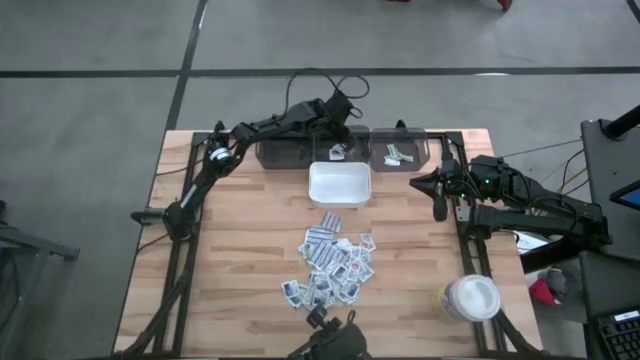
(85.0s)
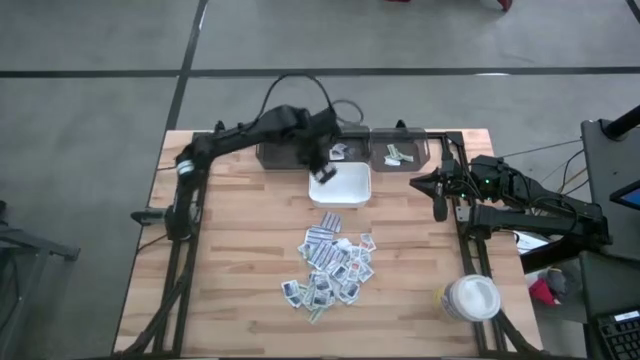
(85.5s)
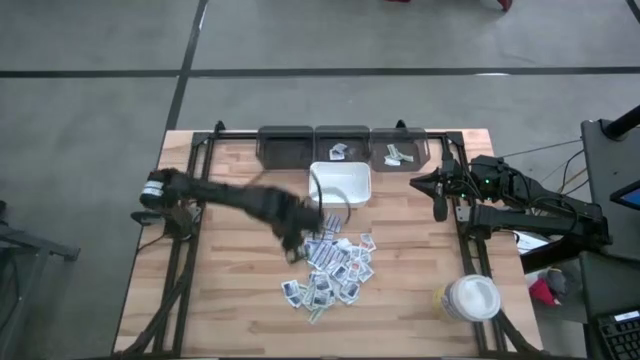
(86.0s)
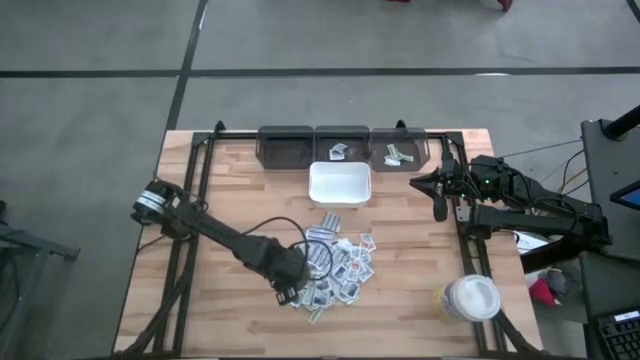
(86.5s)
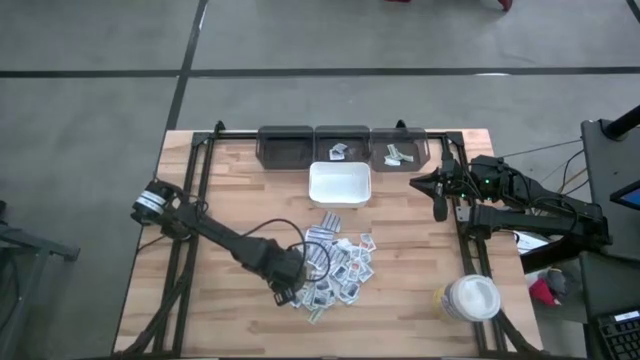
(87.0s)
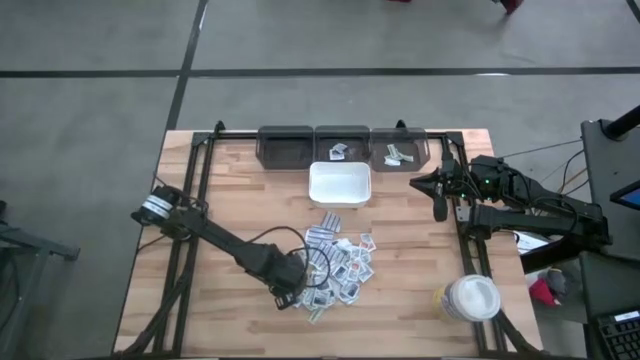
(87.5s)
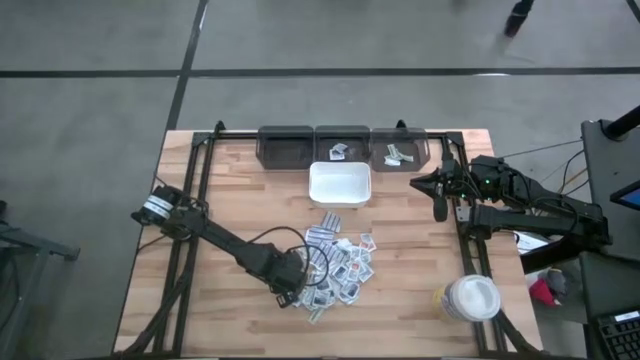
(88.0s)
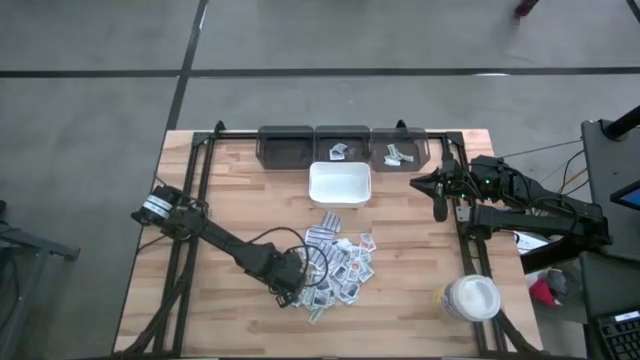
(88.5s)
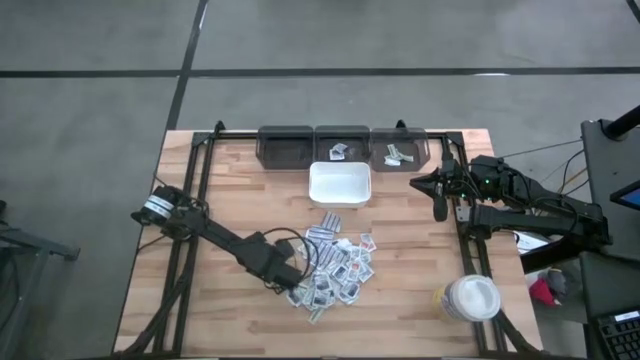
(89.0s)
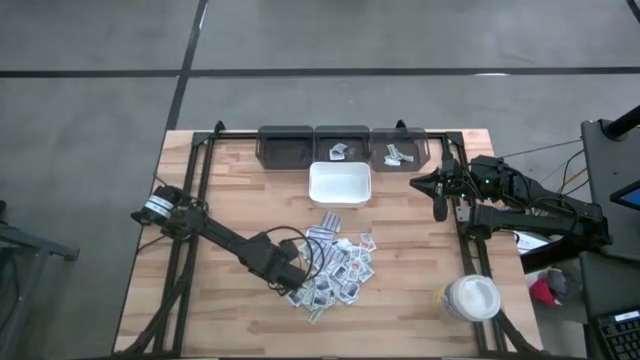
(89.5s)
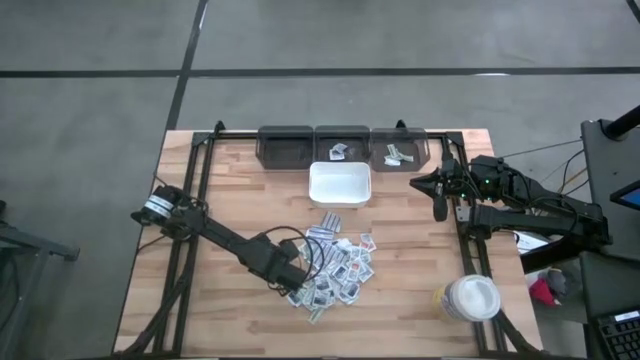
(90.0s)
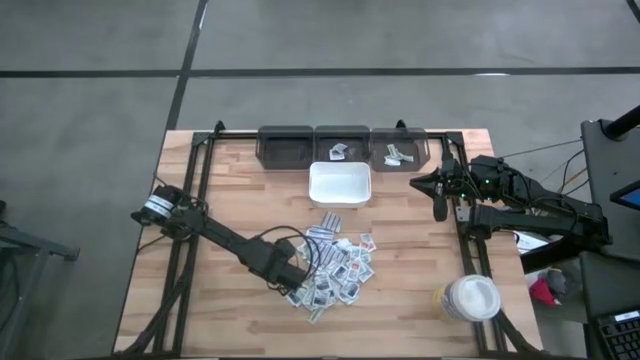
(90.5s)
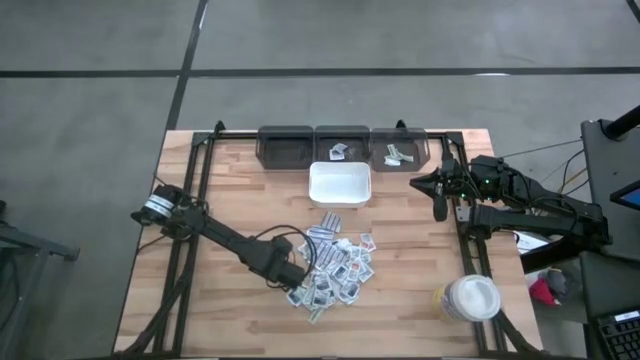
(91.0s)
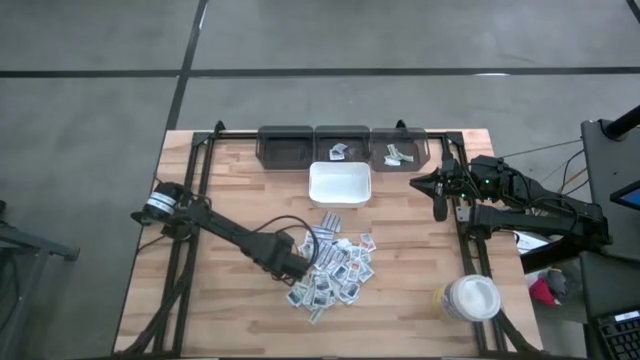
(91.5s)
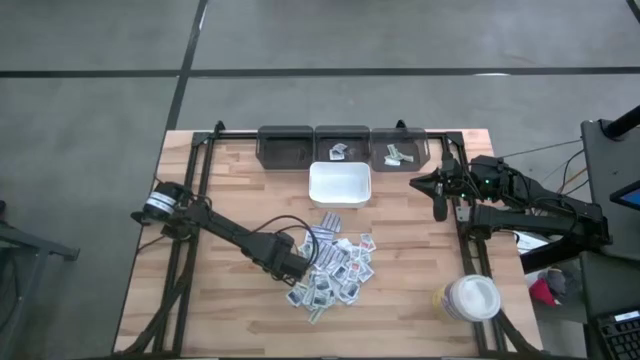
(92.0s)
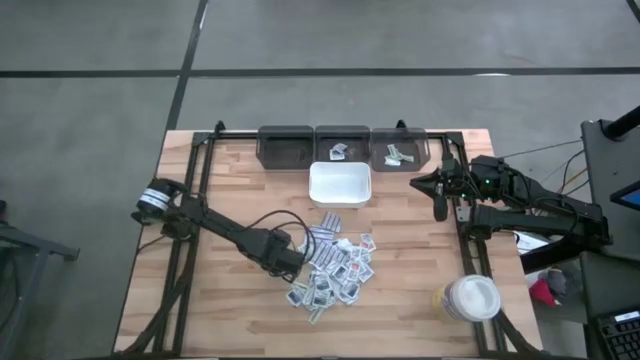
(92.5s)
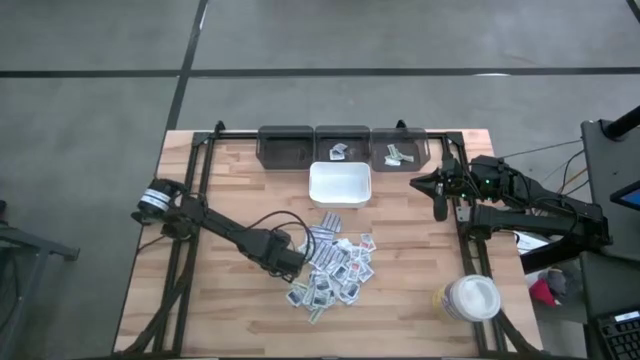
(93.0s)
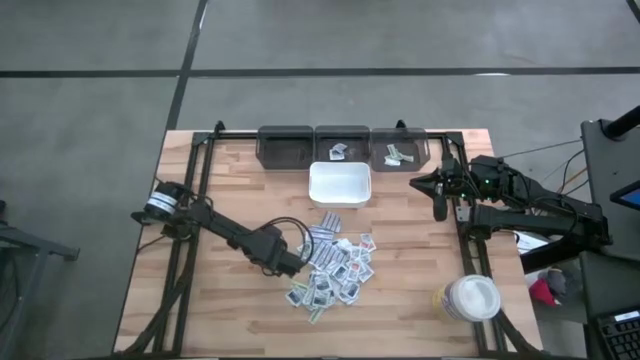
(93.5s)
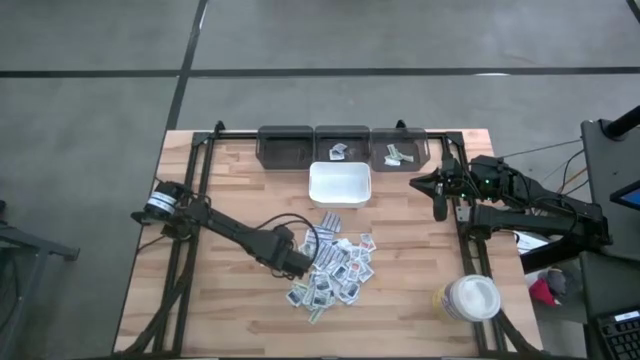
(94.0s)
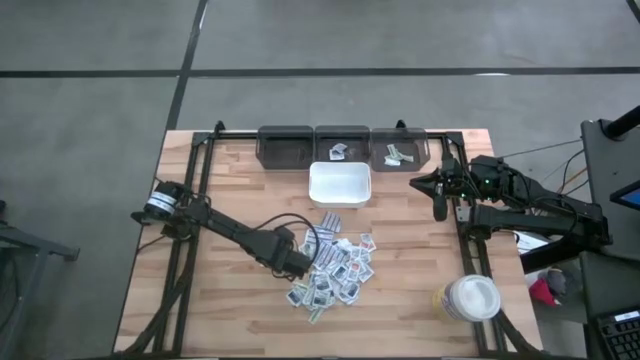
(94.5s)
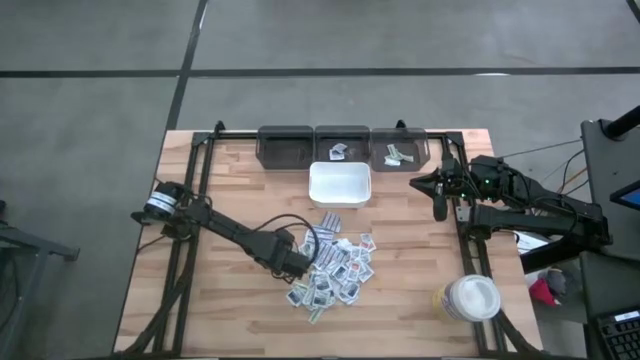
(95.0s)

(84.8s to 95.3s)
Task: Pick & Place First Aid Supplies
Put the blue alcohol pad into the middle gray bin

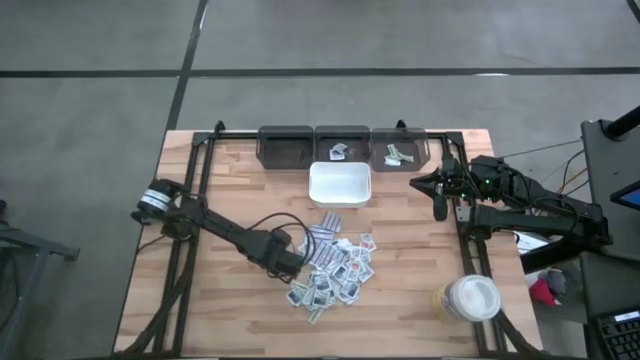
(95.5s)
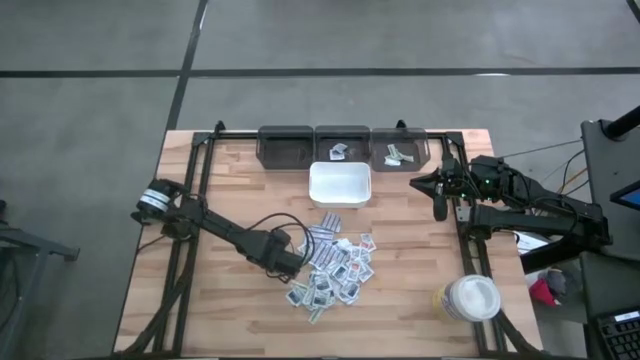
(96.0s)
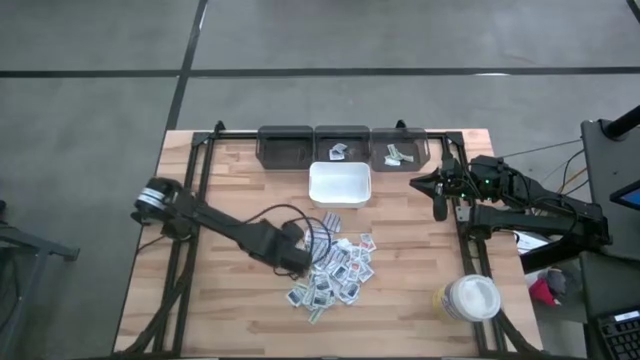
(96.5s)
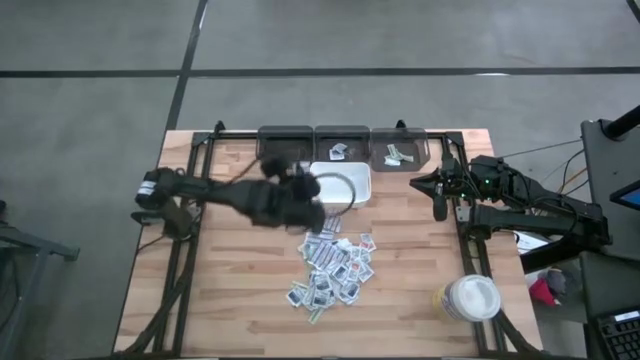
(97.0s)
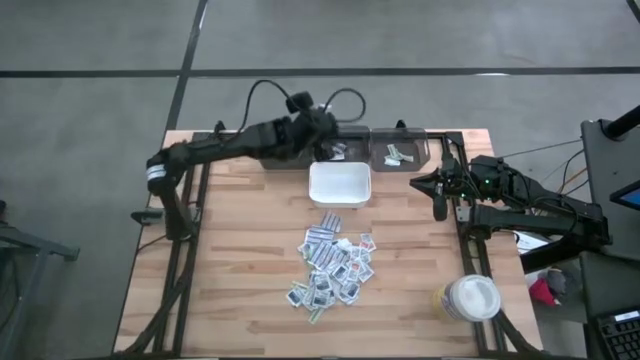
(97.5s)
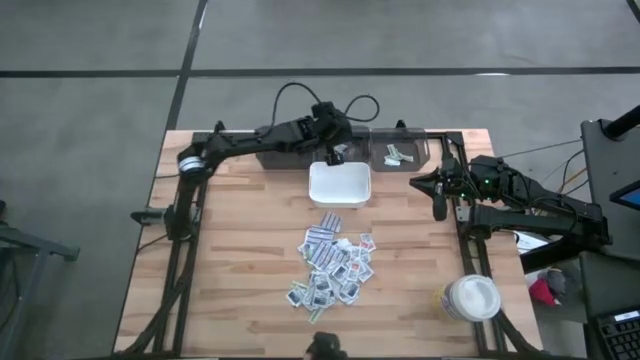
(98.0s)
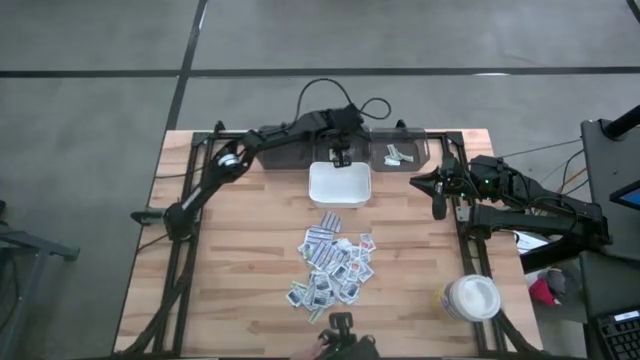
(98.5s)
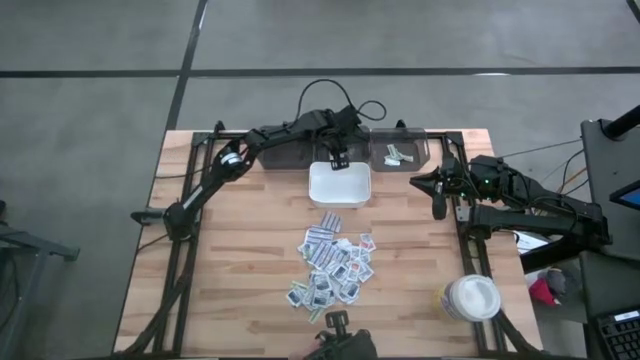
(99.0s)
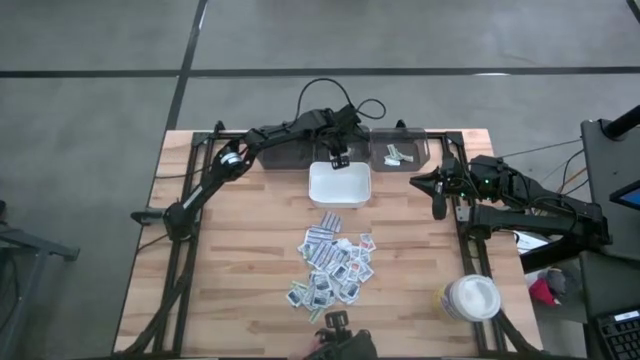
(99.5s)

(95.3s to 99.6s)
Put the blue alcohol pad into the middle gray bin

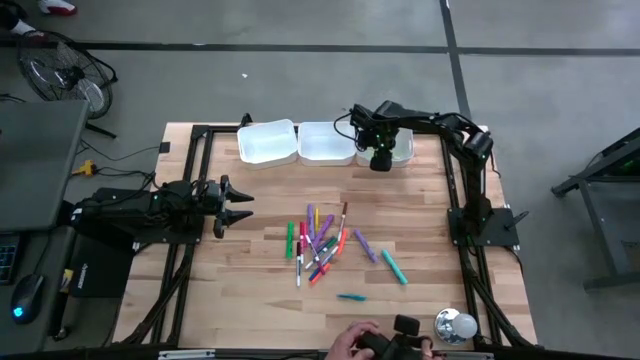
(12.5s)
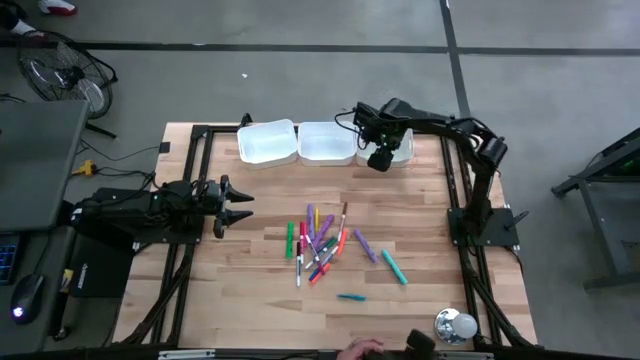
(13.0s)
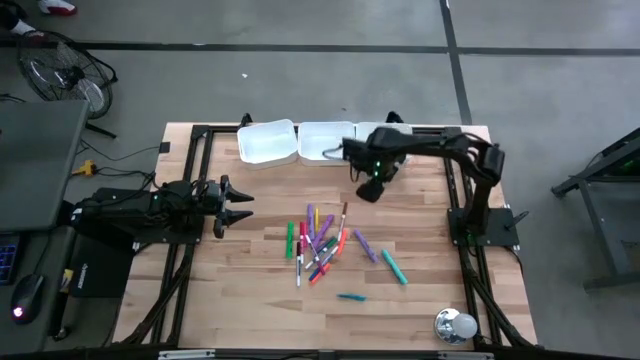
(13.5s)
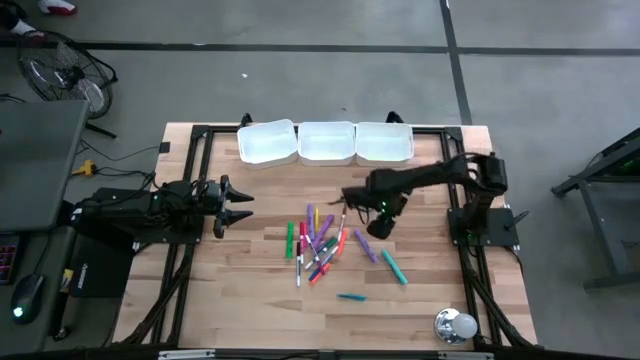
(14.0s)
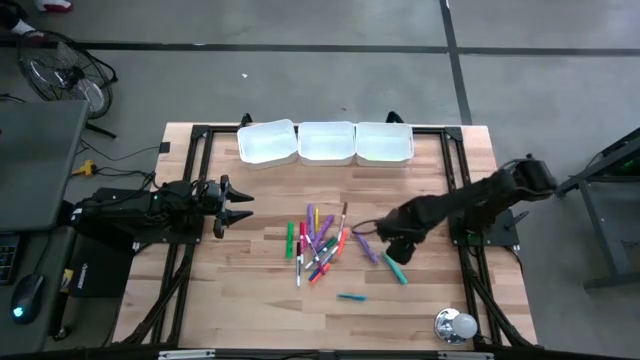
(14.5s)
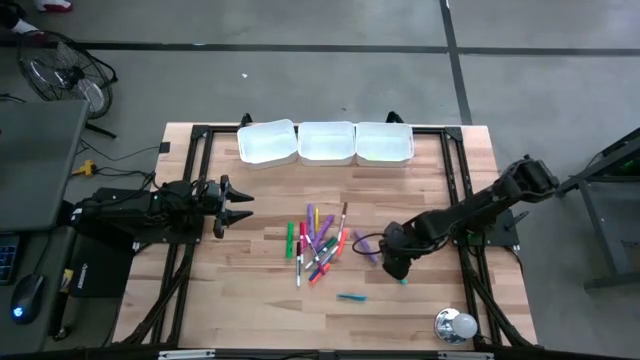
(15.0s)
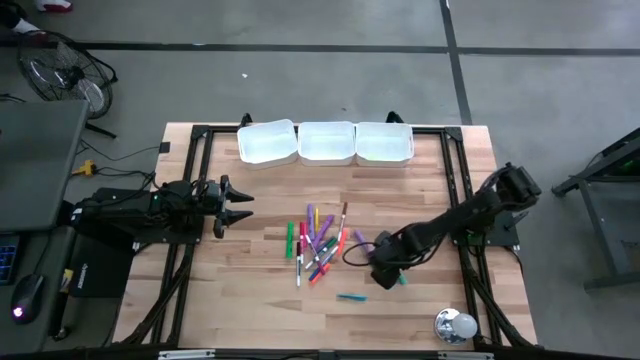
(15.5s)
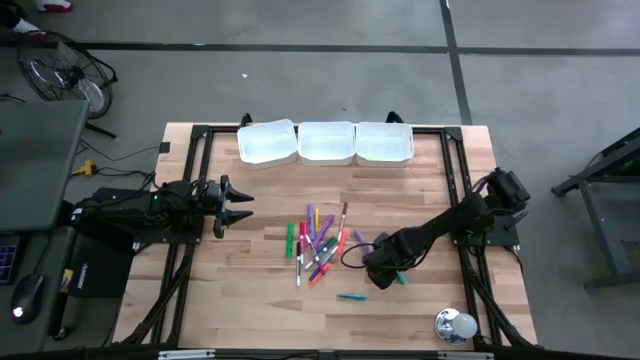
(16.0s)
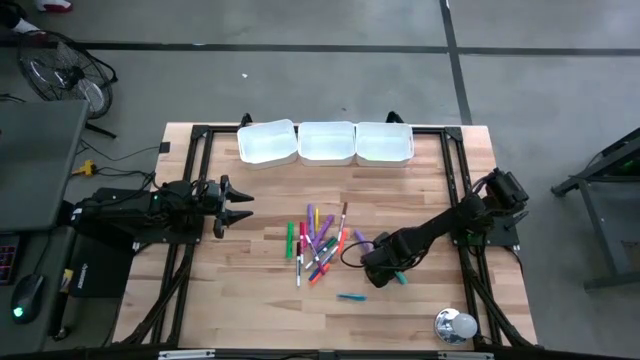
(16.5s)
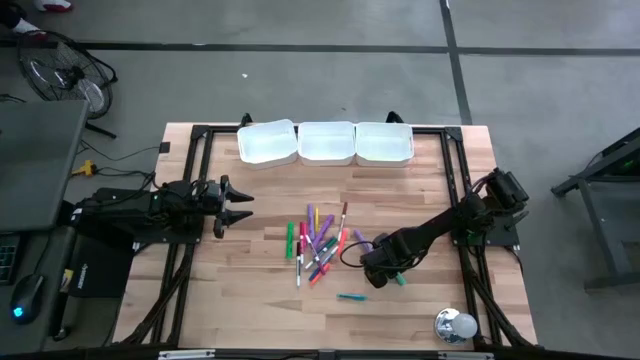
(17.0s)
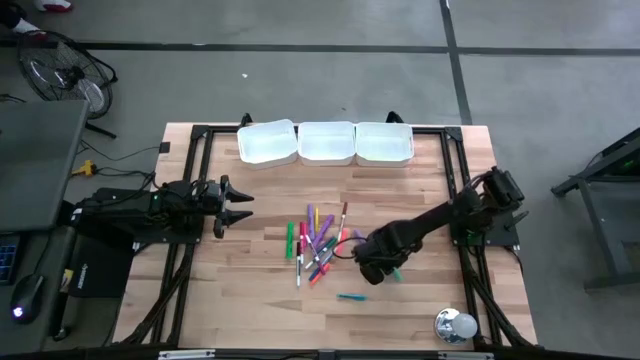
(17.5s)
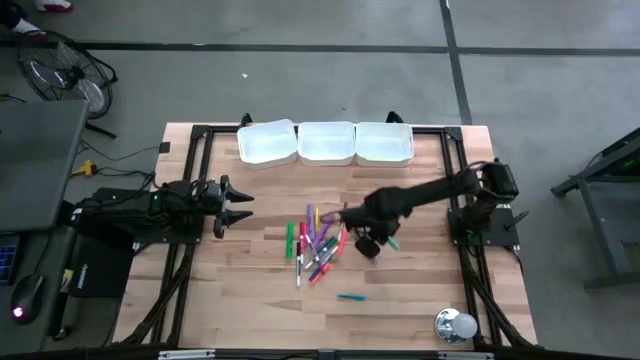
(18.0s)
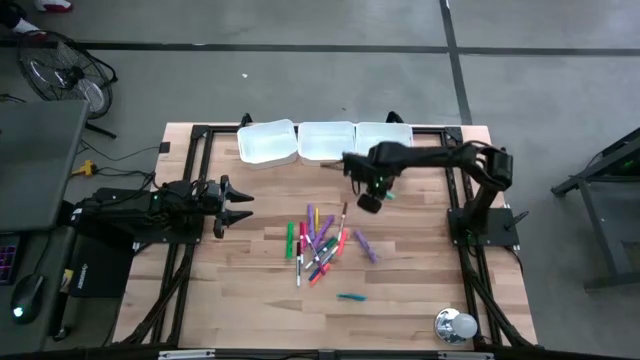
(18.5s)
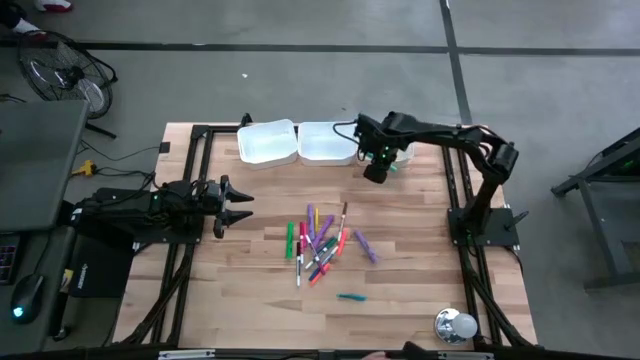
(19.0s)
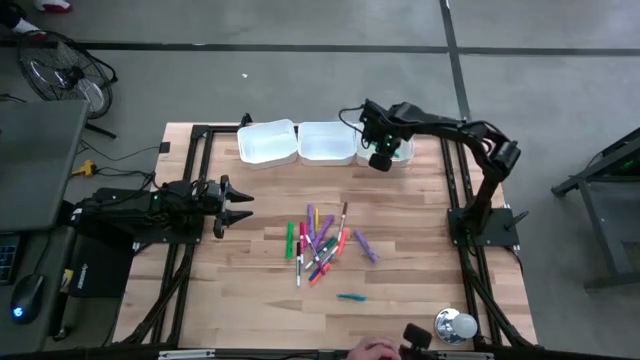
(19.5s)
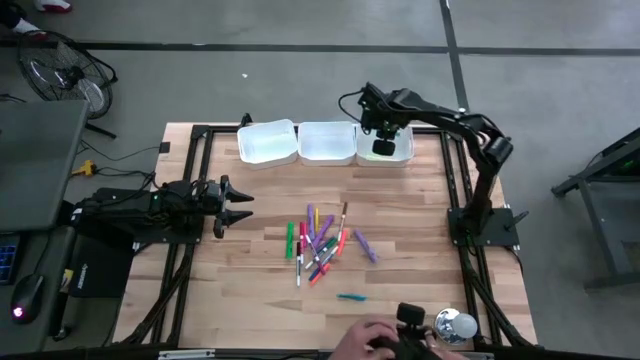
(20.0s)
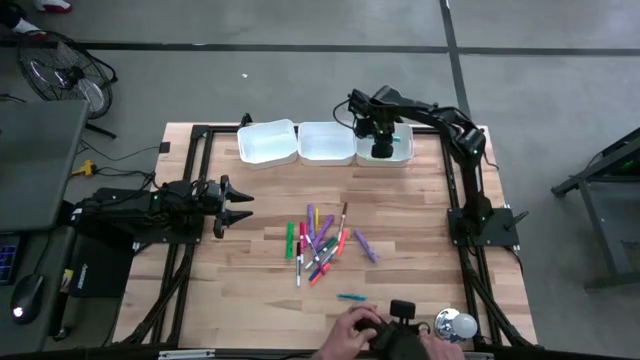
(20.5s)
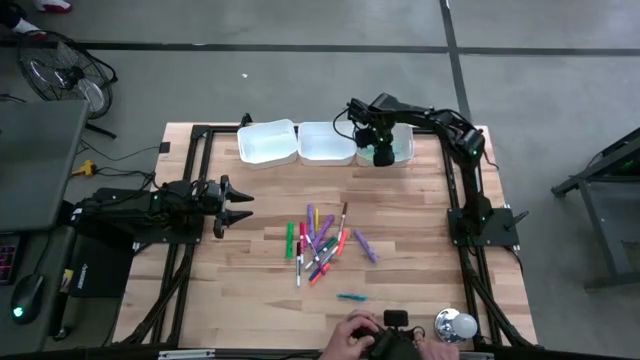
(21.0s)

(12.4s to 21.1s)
Task: Pick & Place Markers
Put the blue highlighter pen into the right white bin
